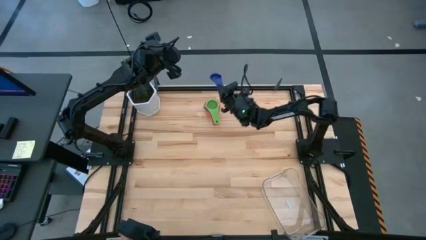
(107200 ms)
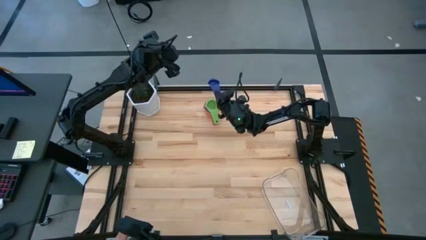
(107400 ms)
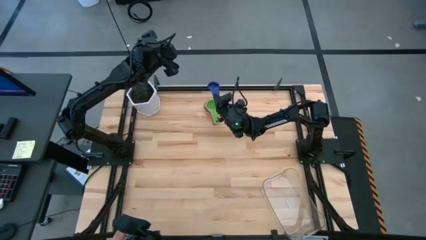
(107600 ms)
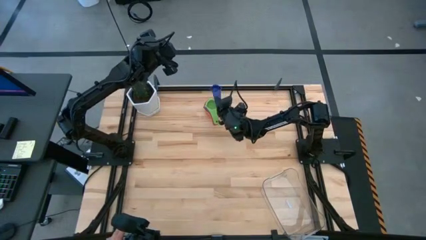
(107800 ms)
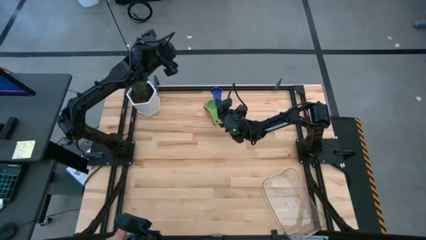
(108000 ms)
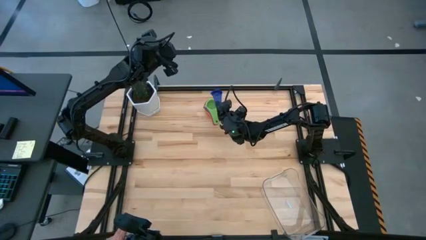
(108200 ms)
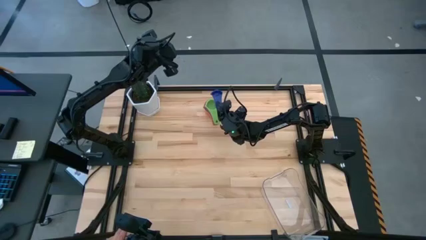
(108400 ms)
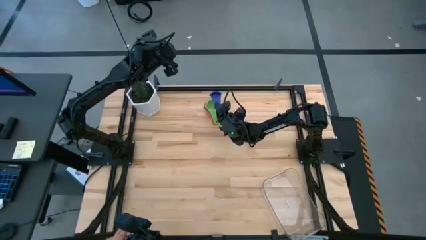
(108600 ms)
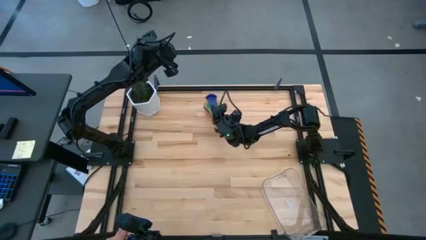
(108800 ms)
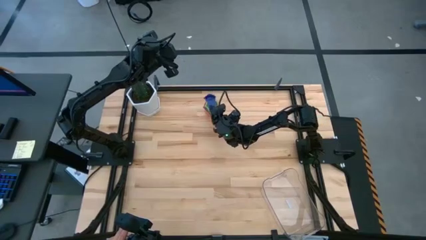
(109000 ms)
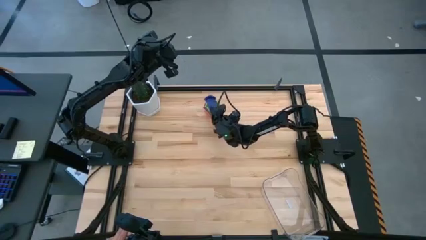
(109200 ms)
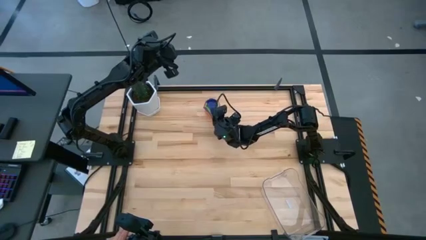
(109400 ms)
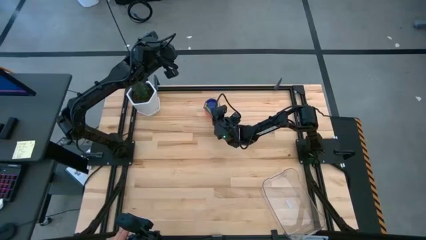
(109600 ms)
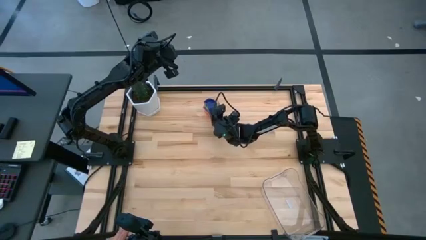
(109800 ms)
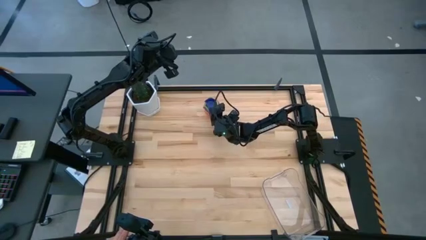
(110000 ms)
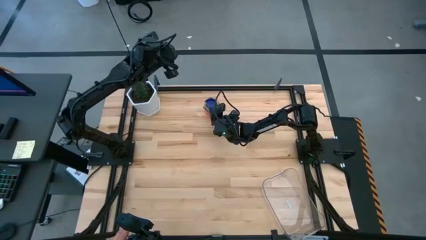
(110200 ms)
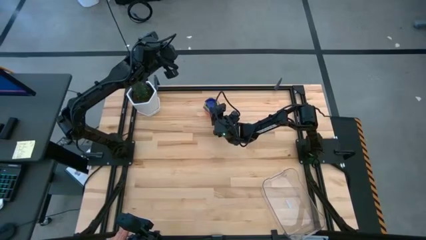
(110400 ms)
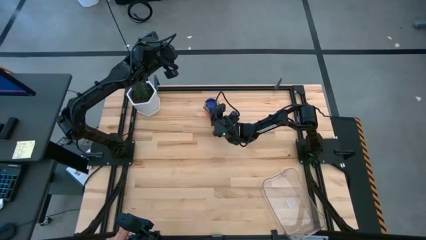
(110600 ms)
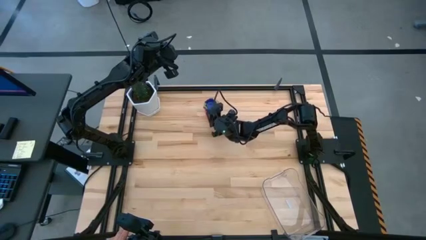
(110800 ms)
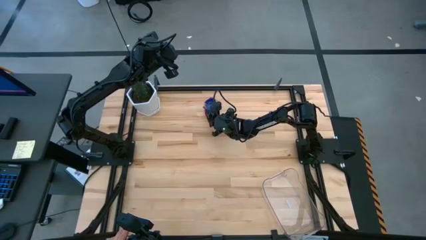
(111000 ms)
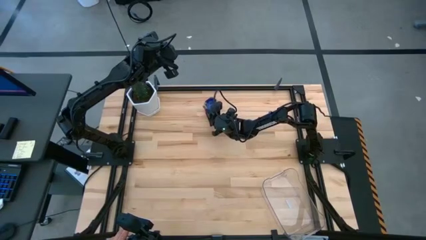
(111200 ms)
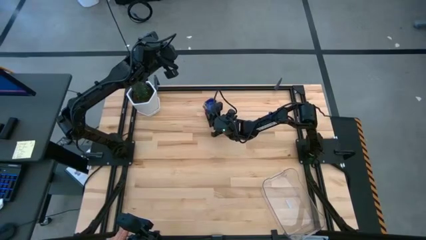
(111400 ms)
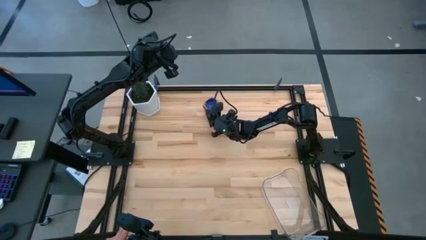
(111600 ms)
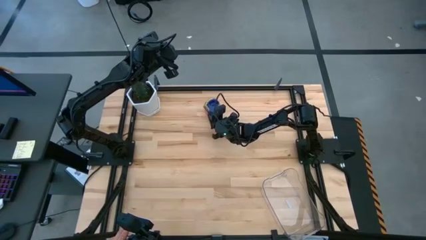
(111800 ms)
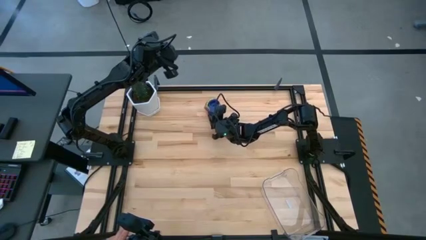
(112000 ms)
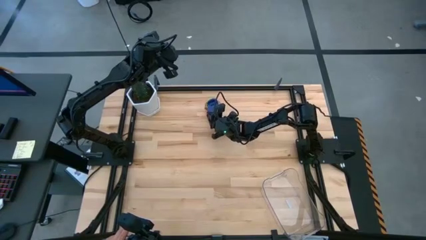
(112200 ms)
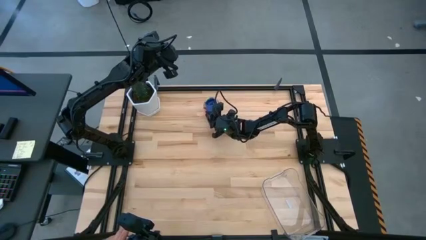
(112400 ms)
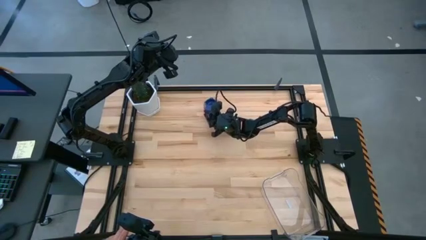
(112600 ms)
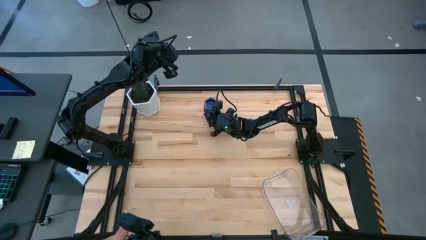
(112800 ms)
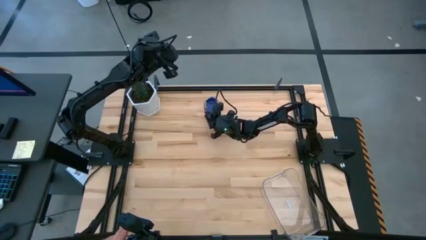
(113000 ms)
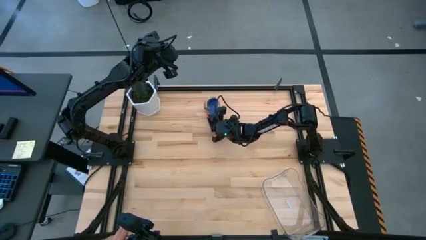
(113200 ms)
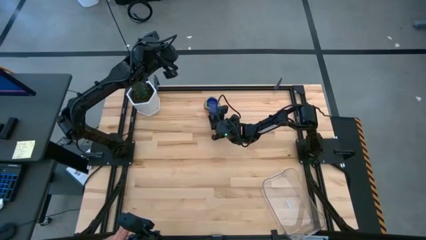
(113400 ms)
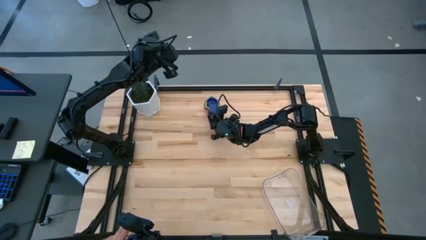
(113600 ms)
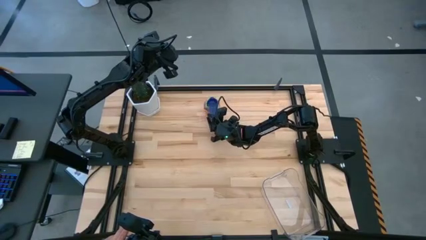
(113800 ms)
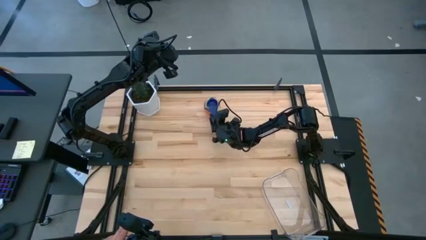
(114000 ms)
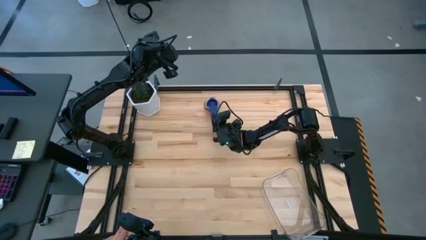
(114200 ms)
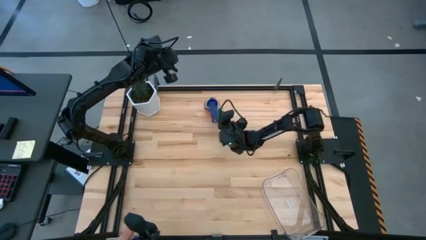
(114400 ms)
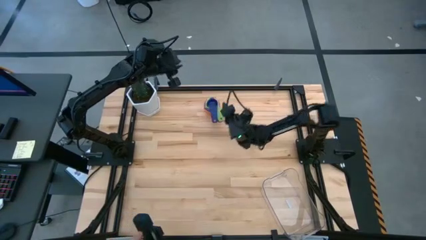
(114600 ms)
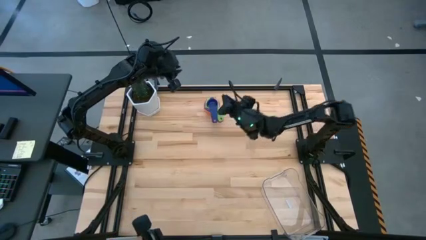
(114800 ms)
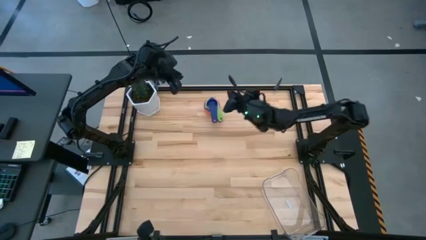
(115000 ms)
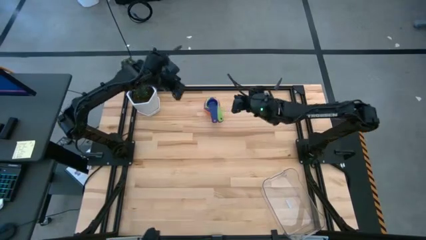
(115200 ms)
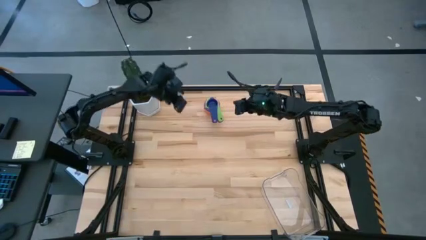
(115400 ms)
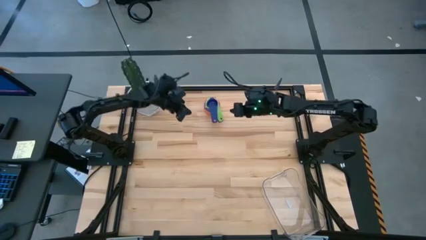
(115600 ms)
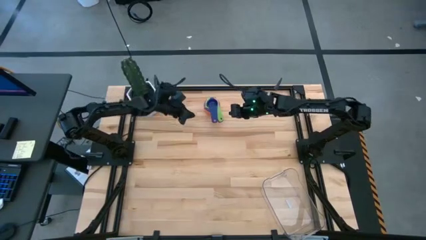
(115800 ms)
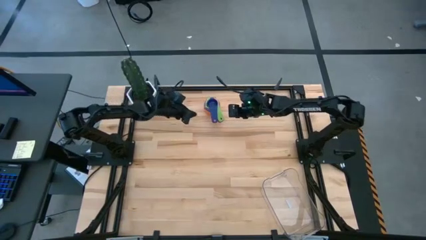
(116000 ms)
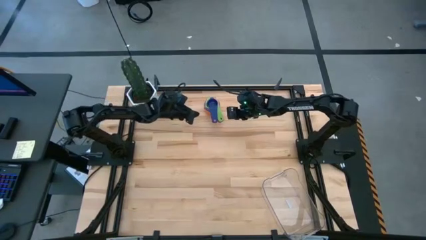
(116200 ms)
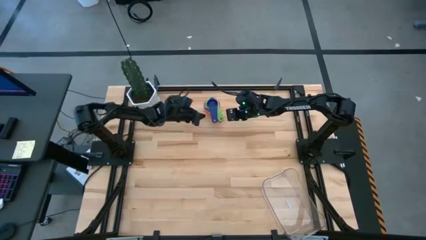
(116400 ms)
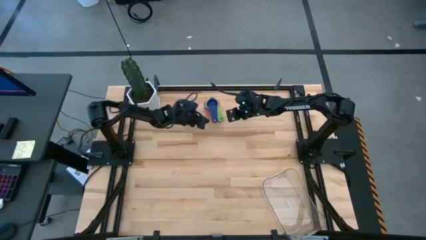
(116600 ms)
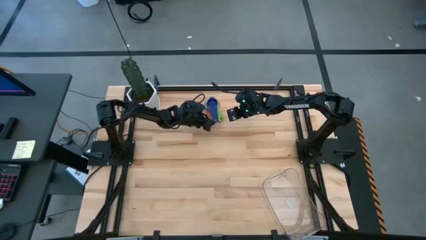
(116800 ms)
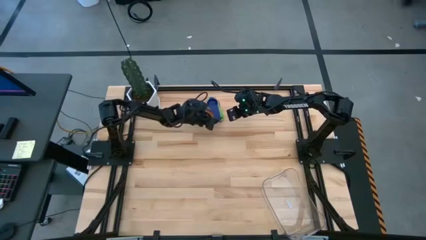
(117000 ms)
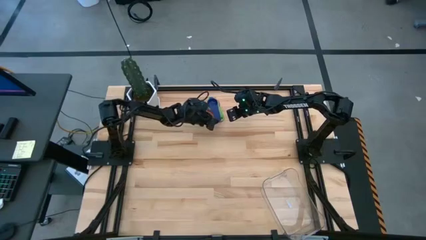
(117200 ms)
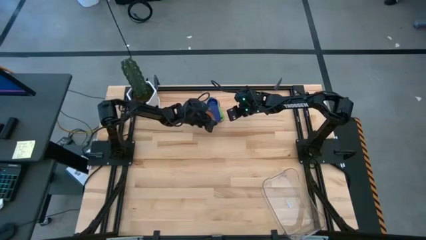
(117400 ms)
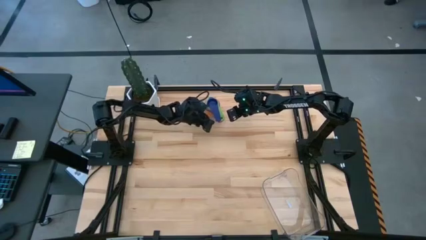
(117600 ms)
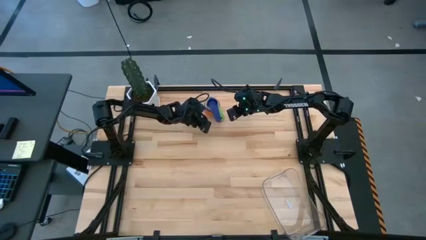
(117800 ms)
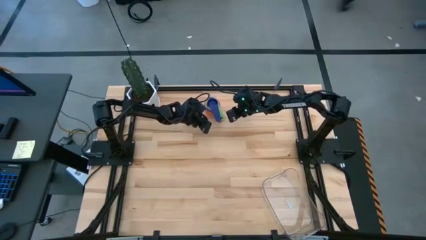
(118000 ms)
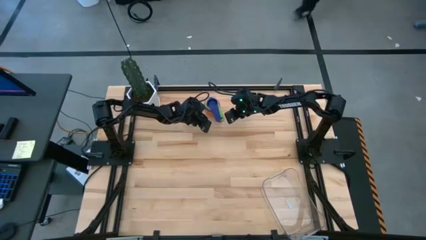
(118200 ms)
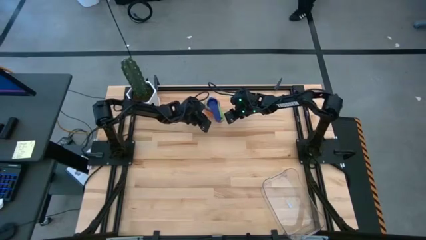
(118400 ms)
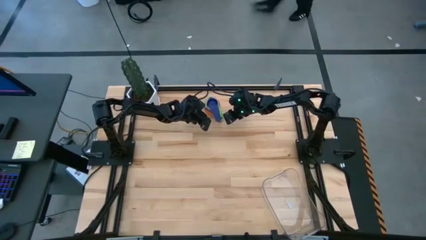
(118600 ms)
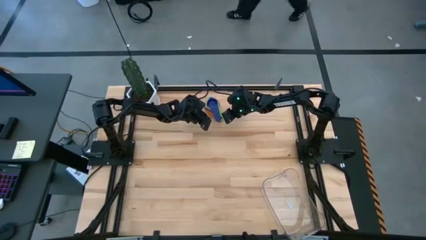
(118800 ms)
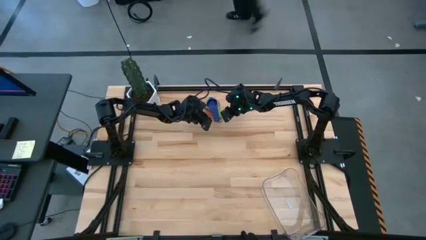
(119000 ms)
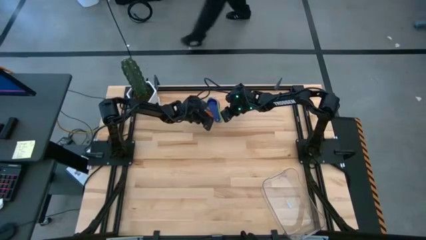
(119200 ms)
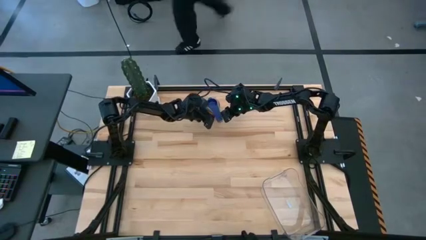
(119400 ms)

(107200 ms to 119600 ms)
Task: Nest measuring cups in basket
Stack the violet measuring cup on top of the green measuring cup
